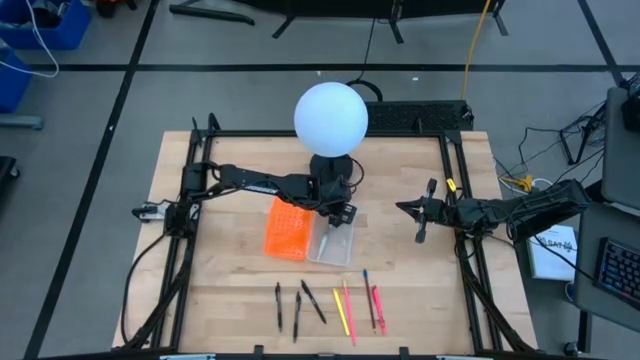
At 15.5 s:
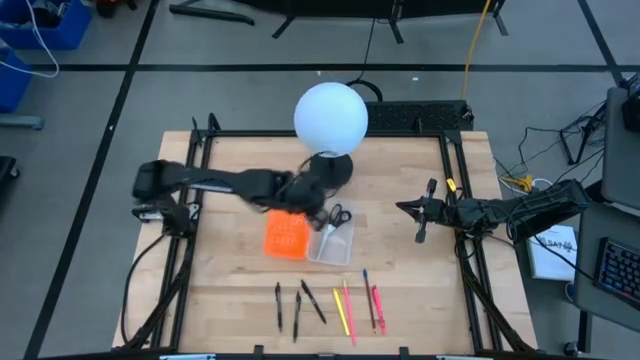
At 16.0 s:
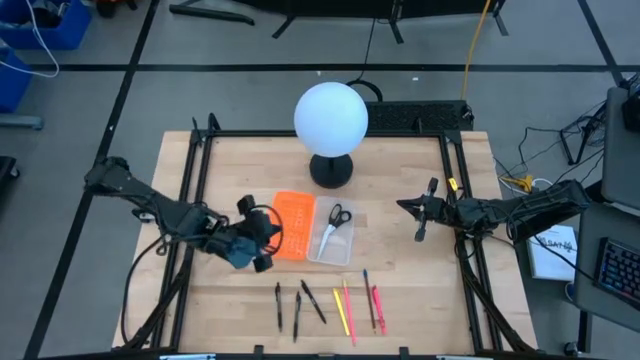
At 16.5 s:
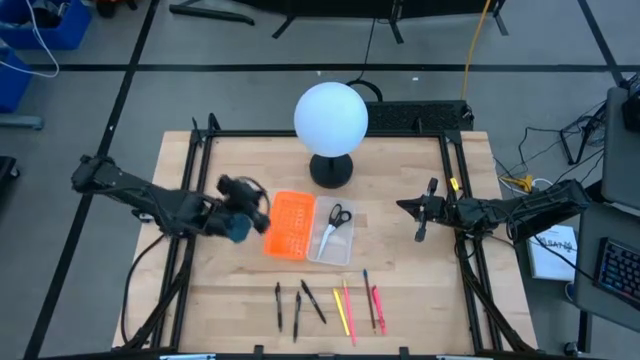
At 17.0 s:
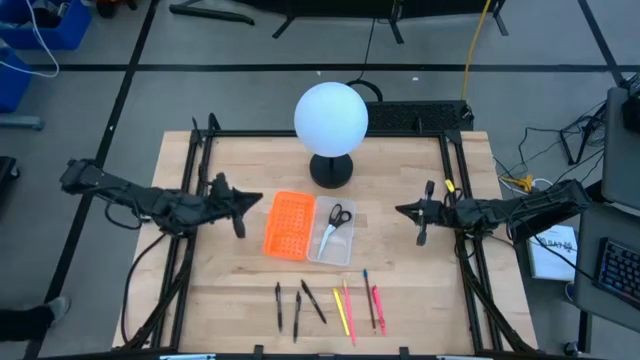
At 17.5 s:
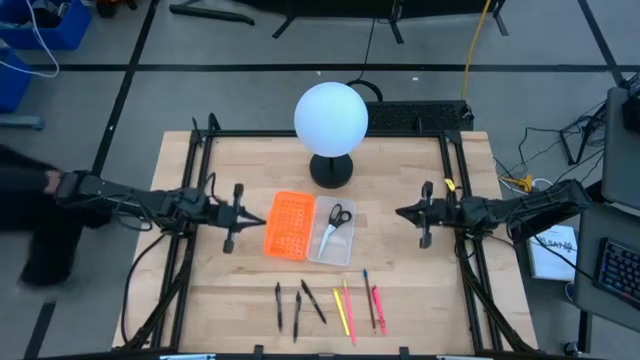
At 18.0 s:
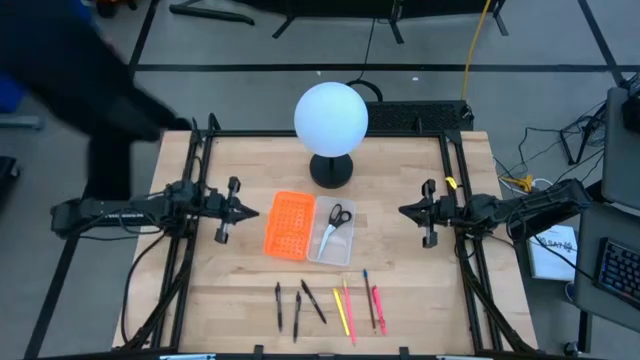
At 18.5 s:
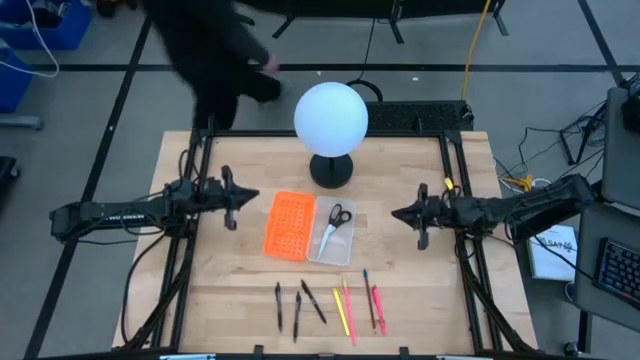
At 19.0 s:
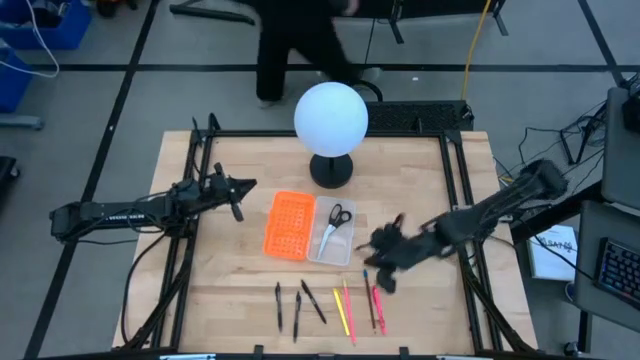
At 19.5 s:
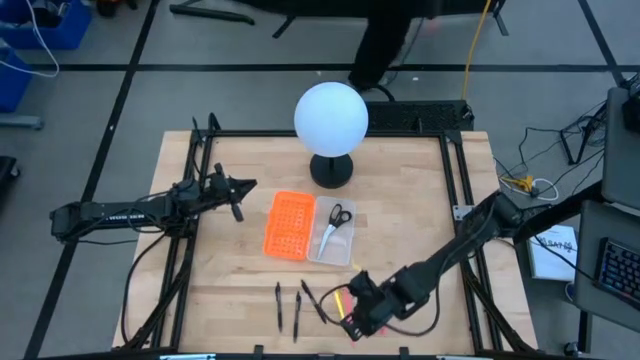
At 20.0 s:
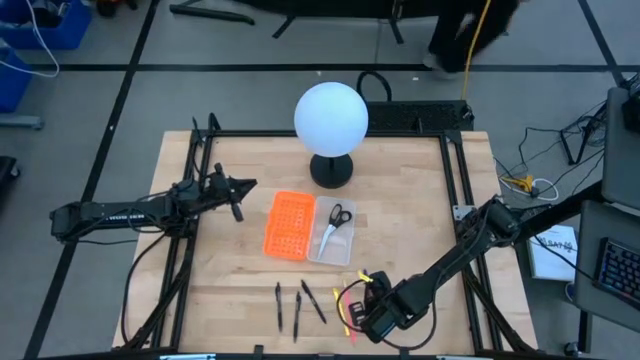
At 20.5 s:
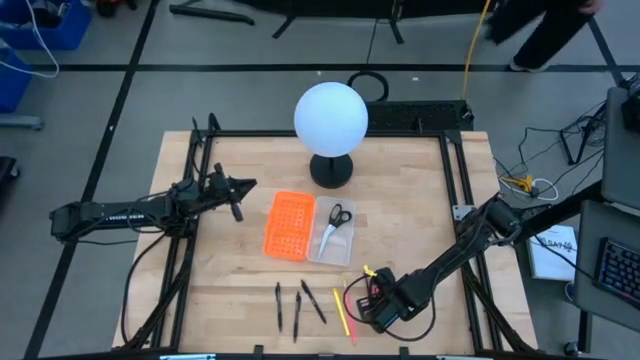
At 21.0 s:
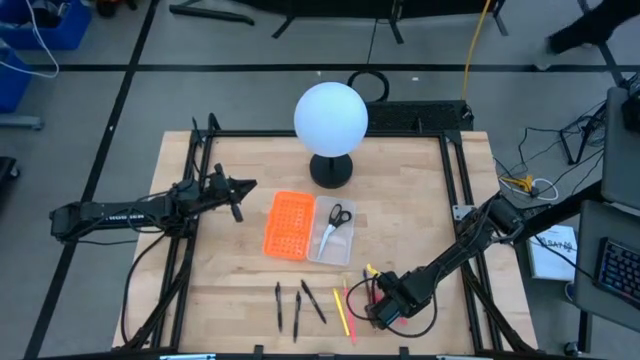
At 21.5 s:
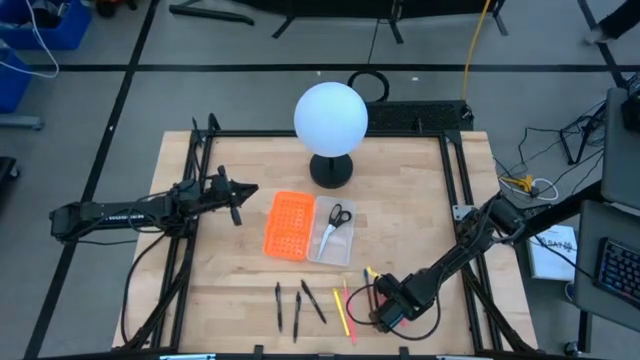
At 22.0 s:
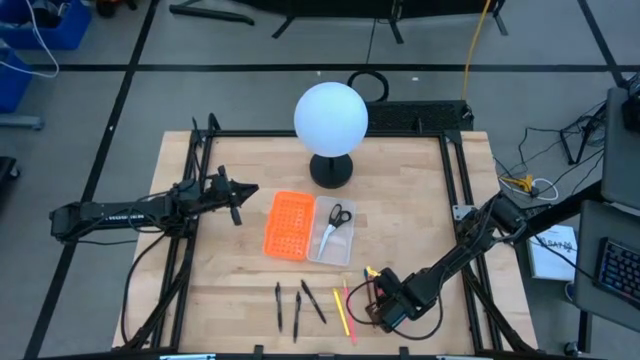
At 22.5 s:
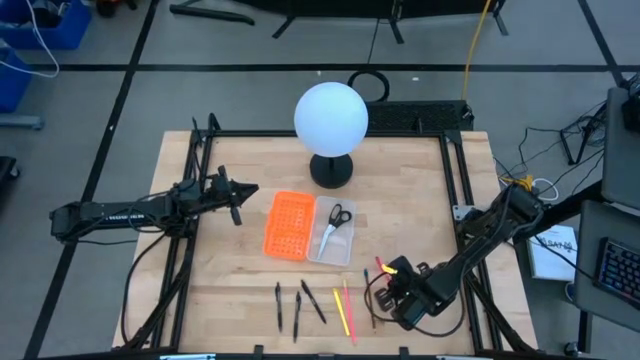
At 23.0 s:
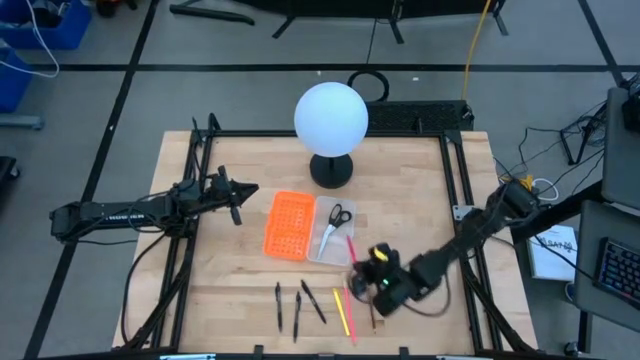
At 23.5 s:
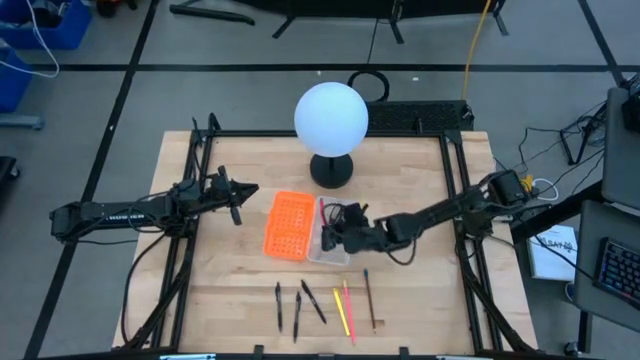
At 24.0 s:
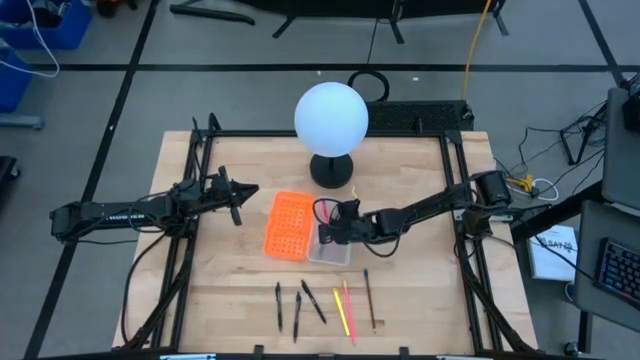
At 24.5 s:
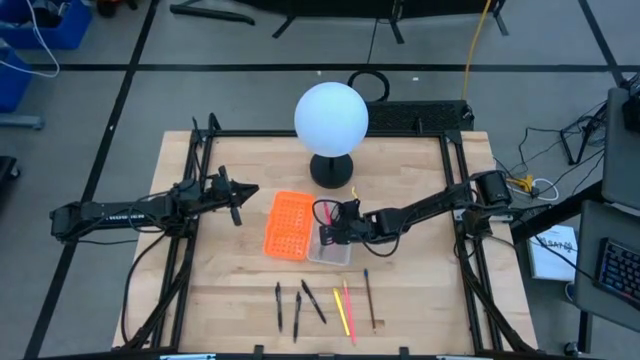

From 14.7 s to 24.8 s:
Task: Pick & place school supplies into a supply box
Put the pink pen into the supply box

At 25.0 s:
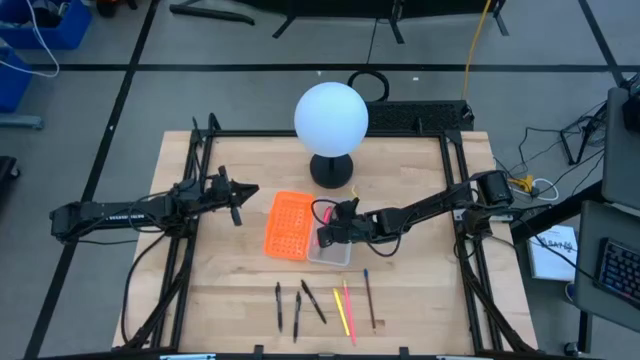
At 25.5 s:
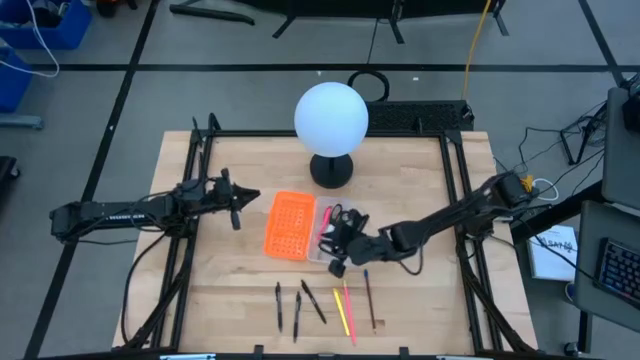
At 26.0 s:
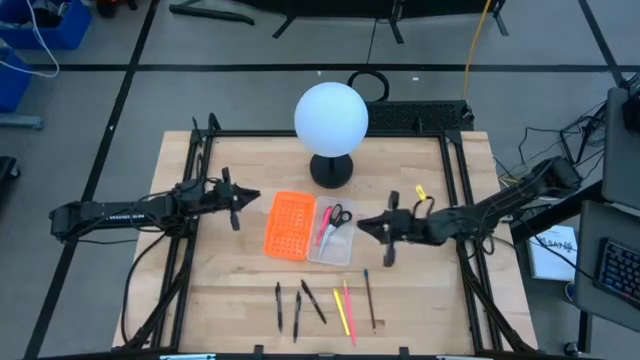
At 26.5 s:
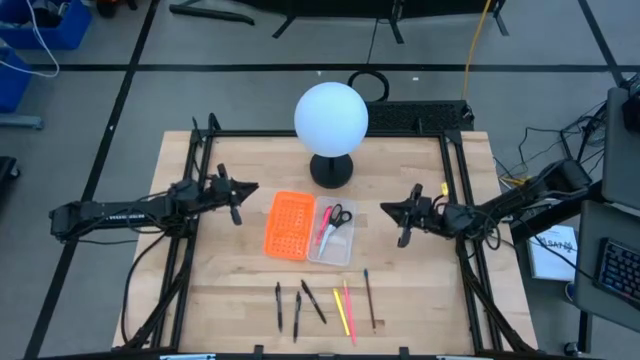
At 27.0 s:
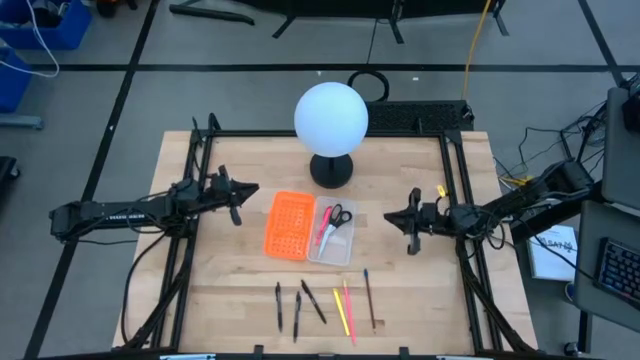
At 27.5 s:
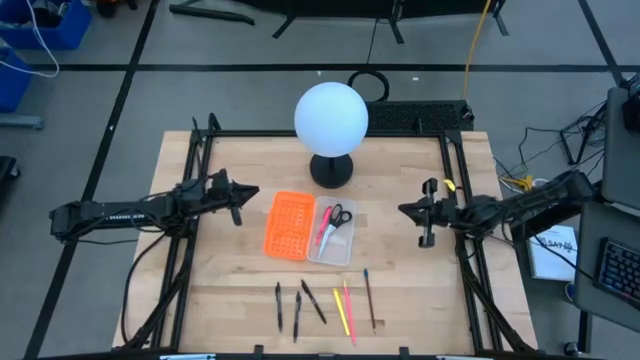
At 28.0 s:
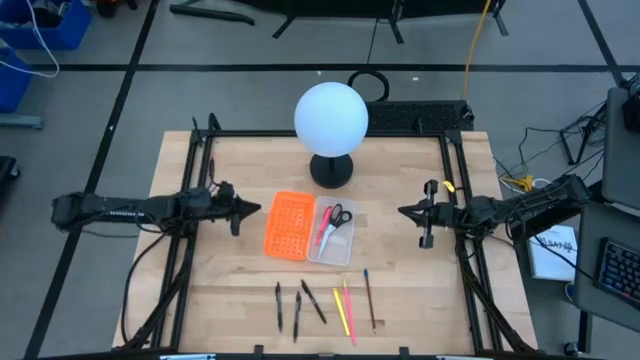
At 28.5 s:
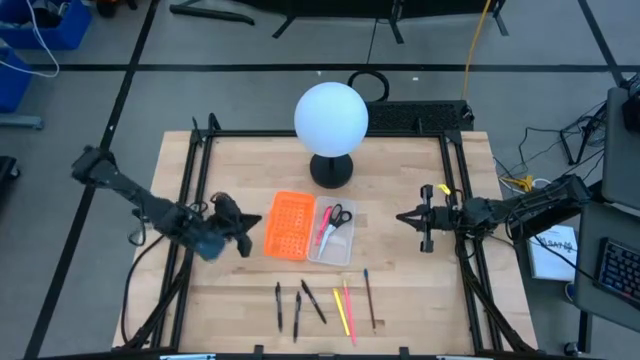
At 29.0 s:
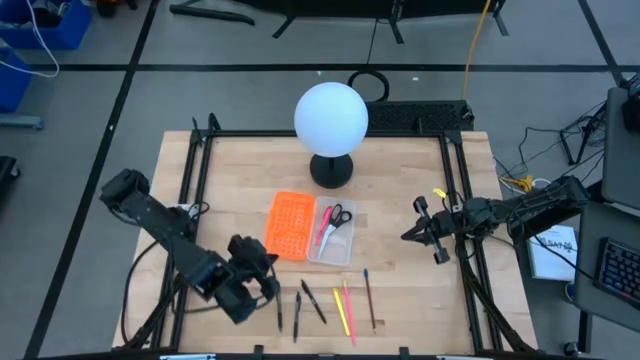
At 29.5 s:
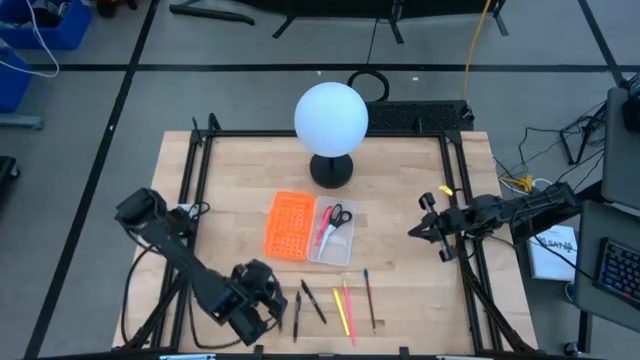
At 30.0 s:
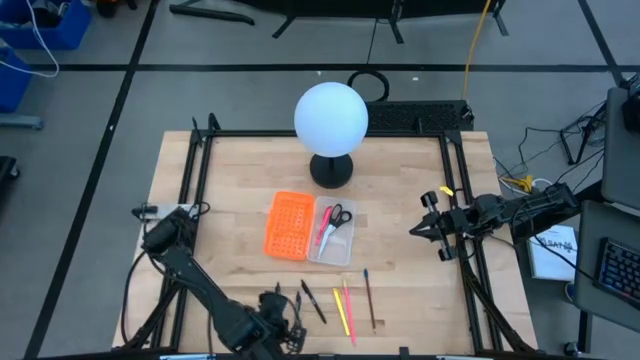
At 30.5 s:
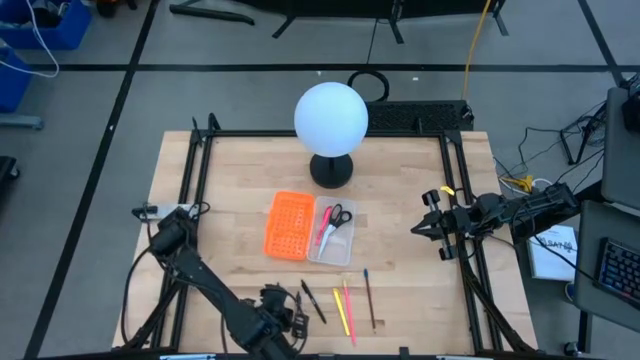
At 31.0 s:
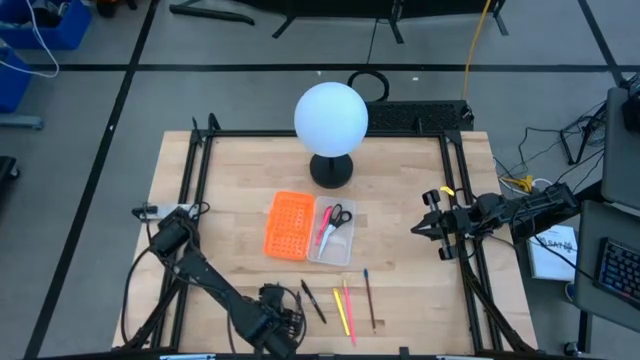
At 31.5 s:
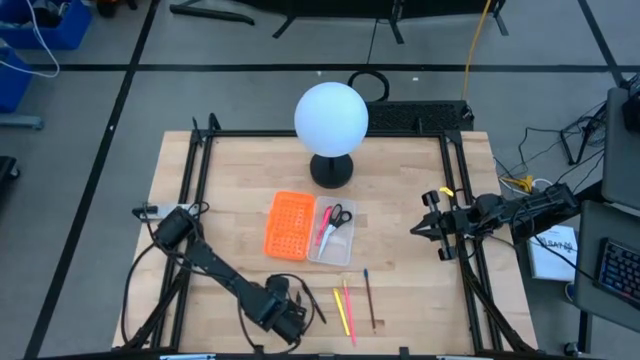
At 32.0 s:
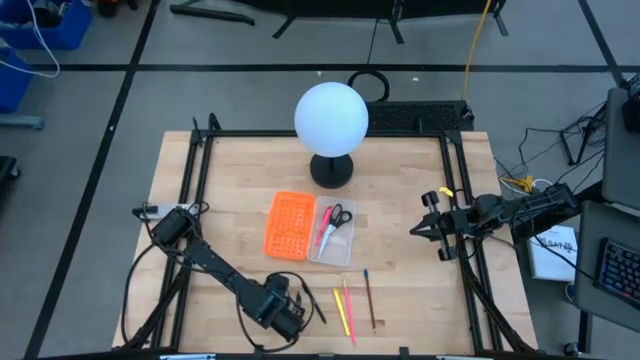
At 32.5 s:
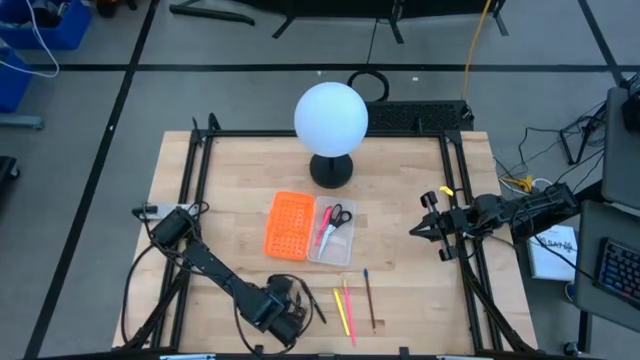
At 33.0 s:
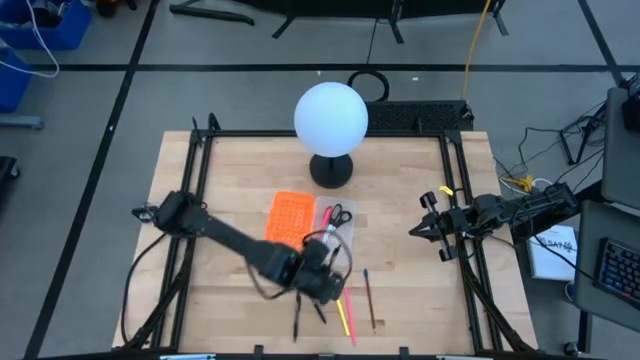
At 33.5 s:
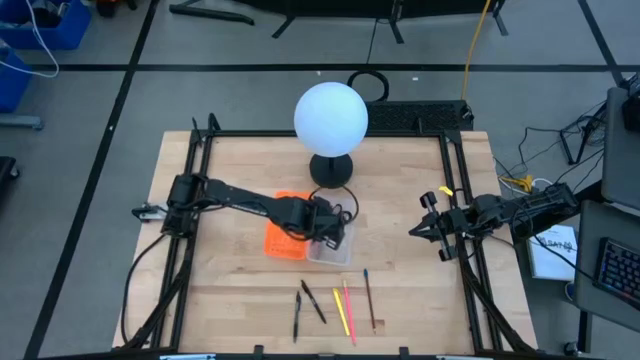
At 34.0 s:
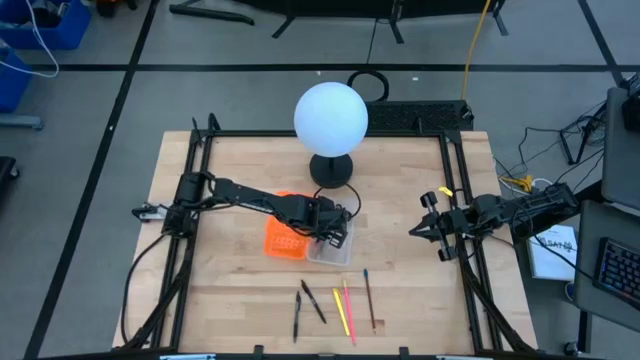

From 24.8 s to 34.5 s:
Put the left black pen into the supply box

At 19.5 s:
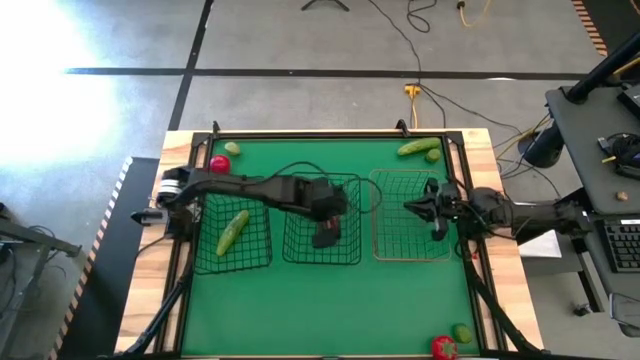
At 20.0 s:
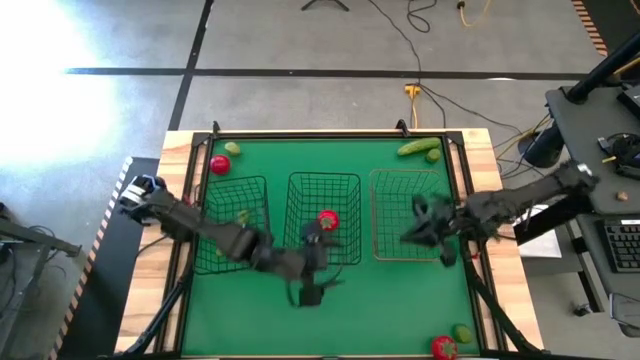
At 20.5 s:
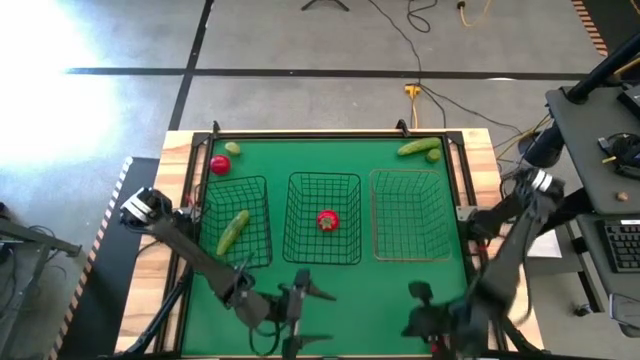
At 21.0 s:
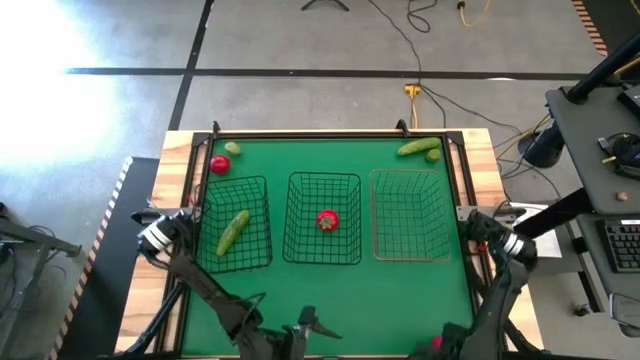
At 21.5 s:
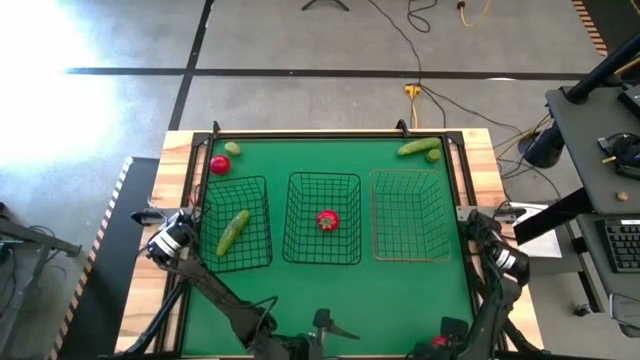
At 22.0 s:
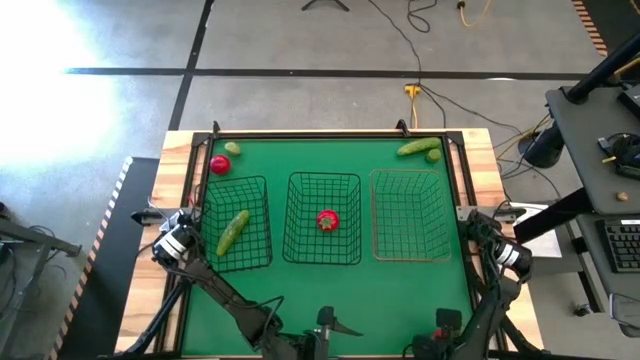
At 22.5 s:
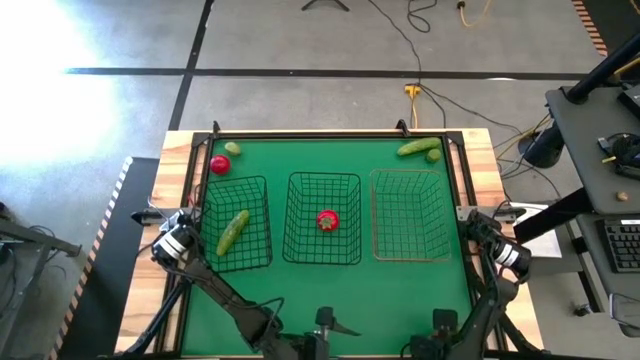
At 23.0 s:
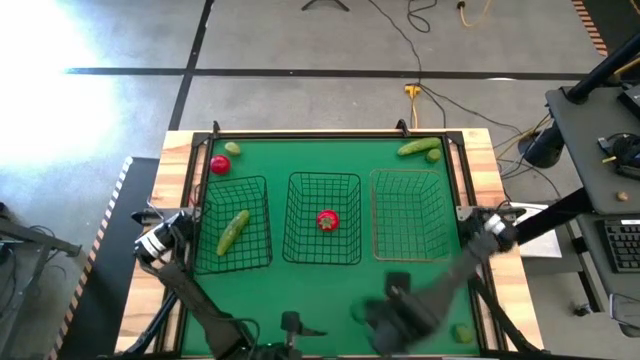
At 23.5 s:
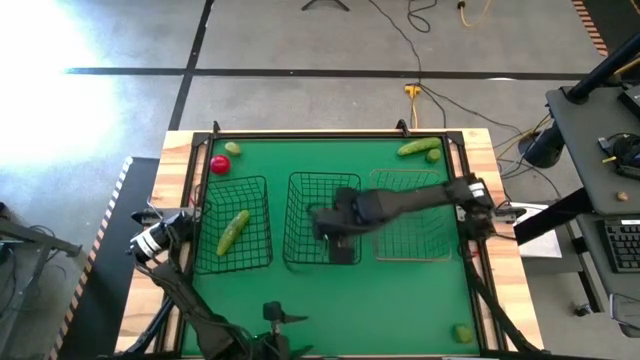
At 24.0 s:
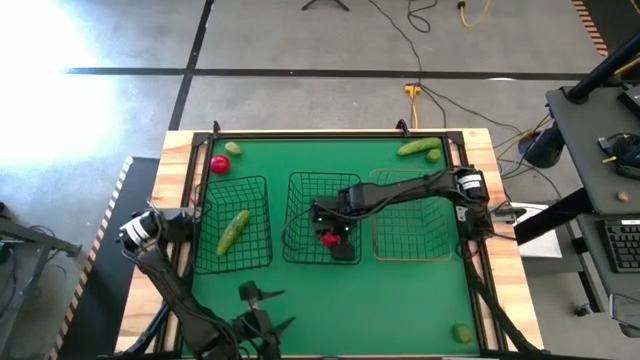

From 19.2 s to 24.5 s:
Task: Sort produce into baskets
Put the bottom tomato into the right black wire basket
